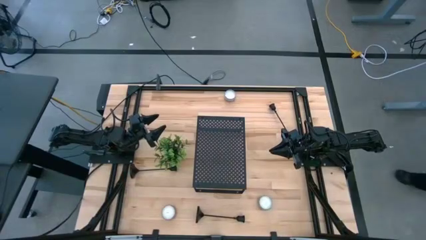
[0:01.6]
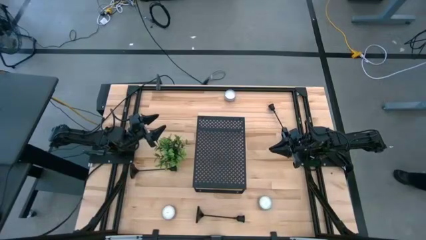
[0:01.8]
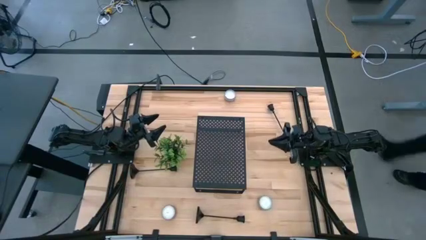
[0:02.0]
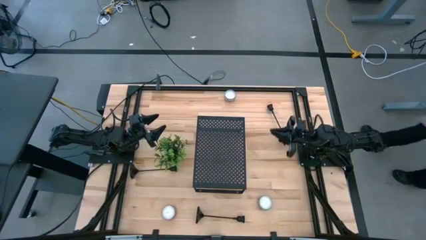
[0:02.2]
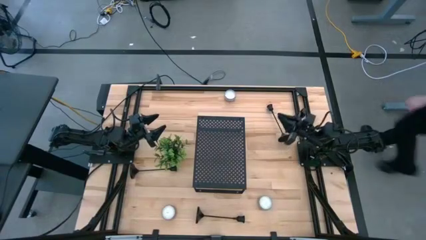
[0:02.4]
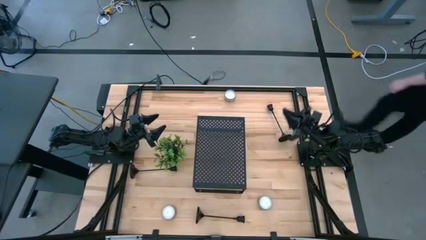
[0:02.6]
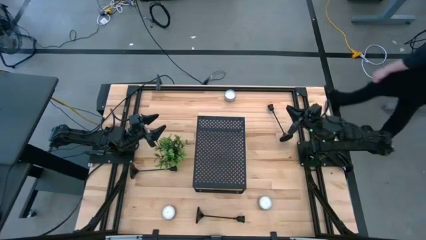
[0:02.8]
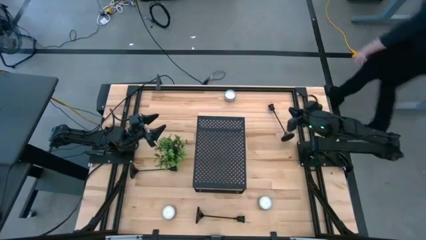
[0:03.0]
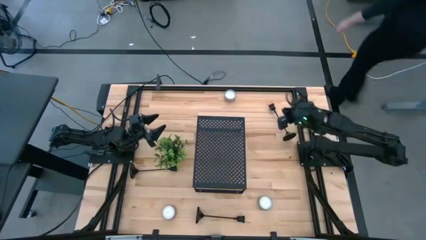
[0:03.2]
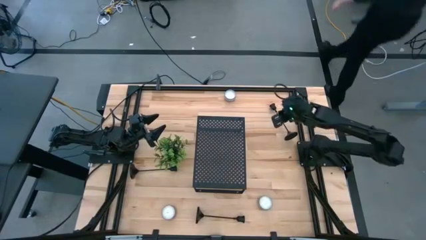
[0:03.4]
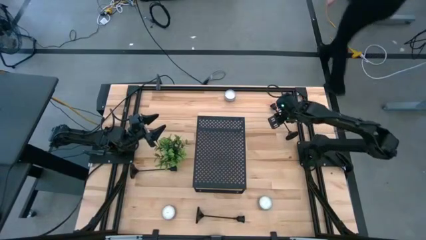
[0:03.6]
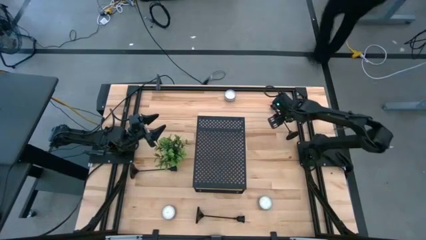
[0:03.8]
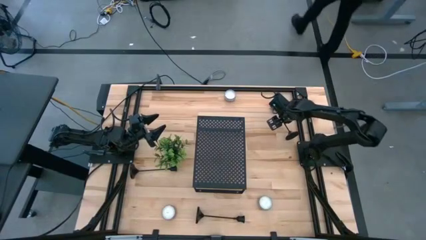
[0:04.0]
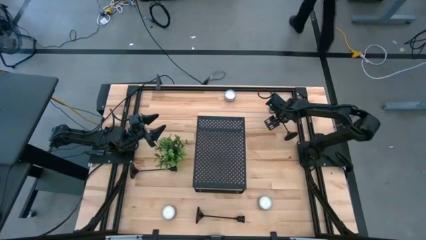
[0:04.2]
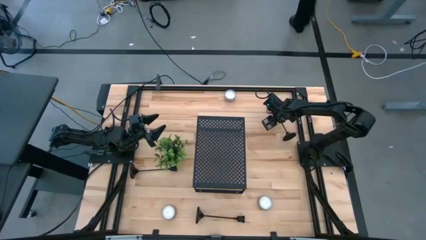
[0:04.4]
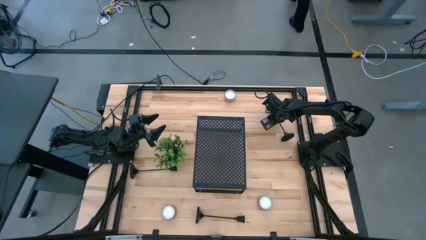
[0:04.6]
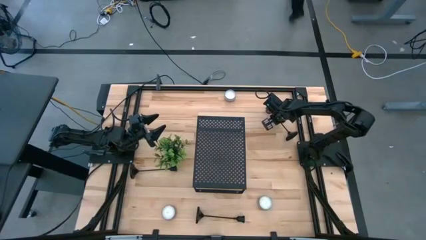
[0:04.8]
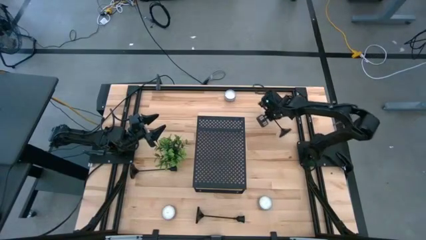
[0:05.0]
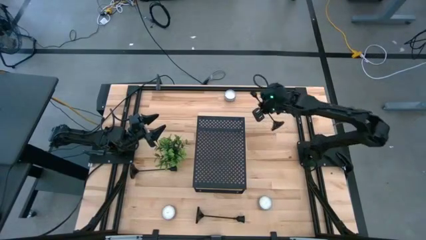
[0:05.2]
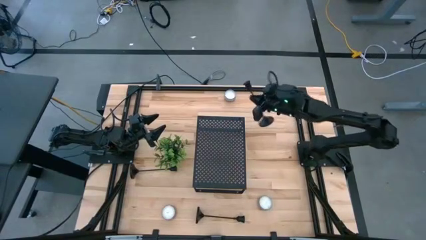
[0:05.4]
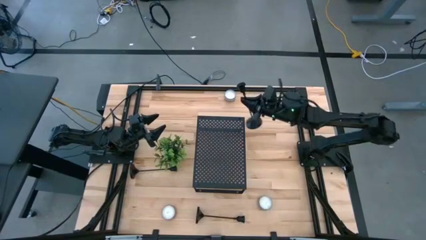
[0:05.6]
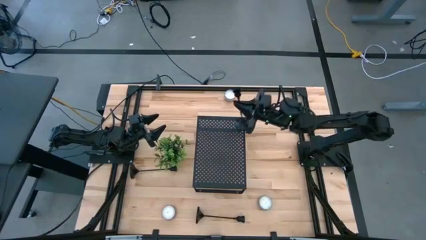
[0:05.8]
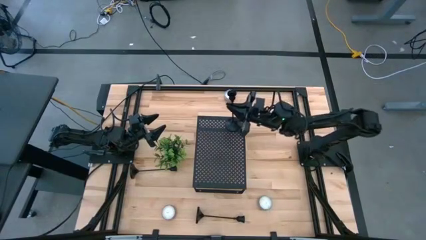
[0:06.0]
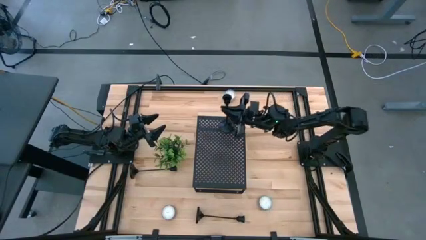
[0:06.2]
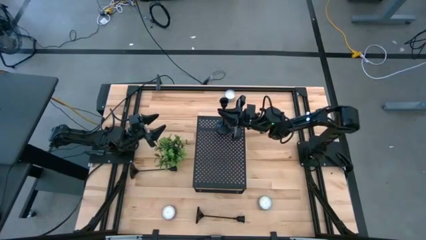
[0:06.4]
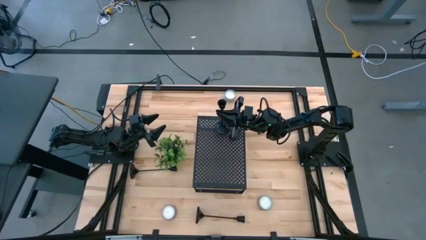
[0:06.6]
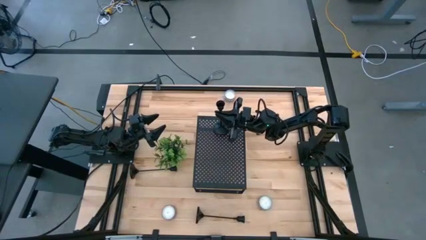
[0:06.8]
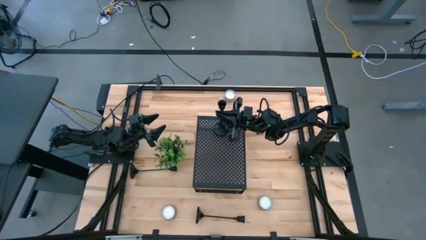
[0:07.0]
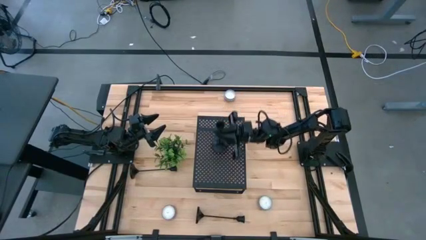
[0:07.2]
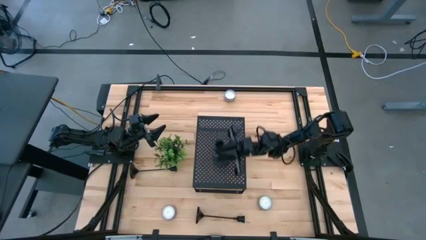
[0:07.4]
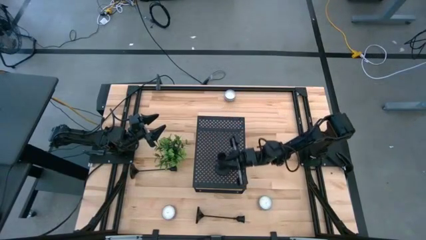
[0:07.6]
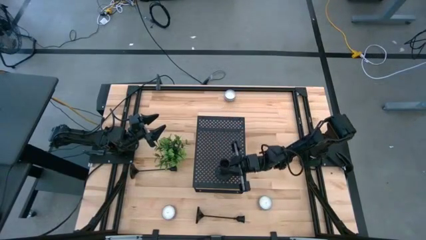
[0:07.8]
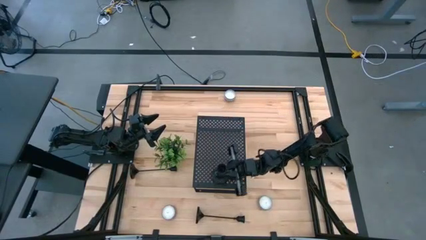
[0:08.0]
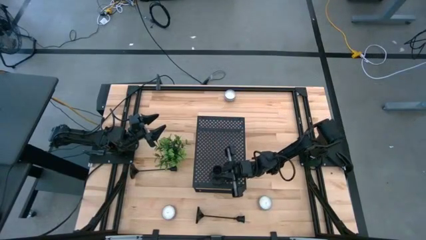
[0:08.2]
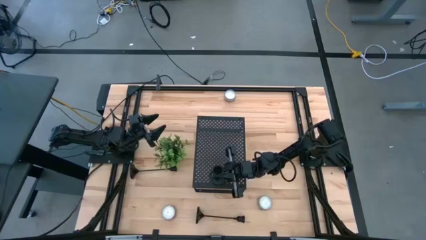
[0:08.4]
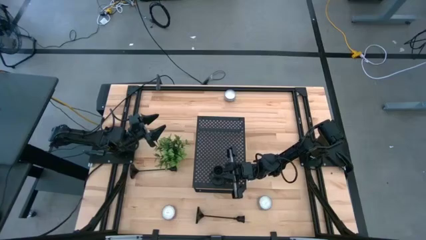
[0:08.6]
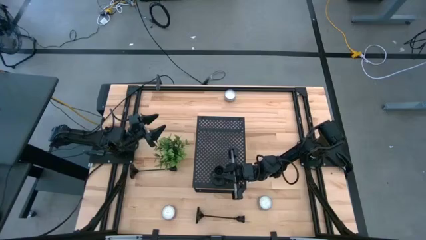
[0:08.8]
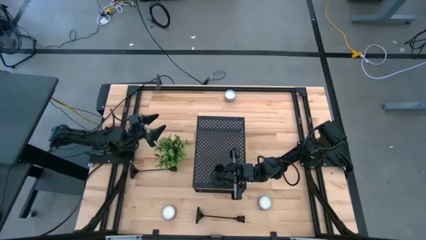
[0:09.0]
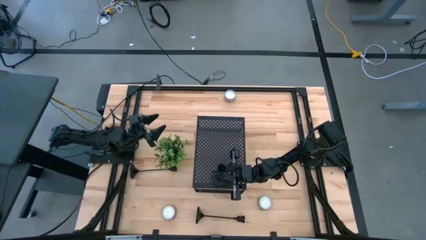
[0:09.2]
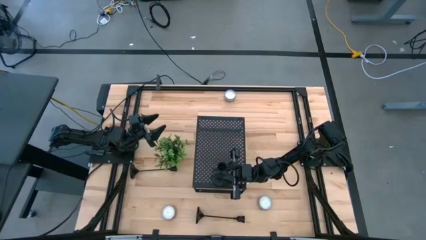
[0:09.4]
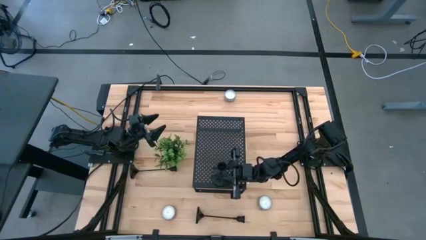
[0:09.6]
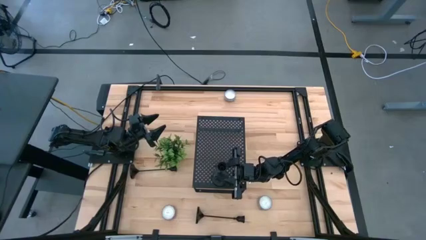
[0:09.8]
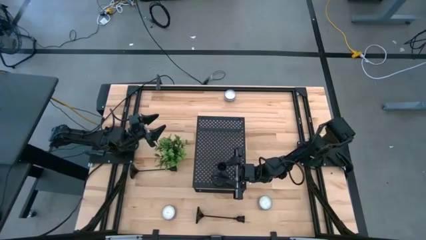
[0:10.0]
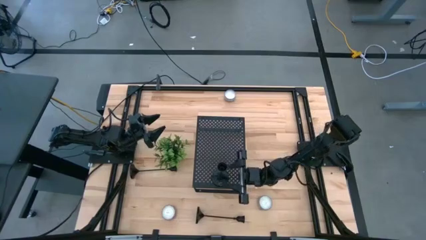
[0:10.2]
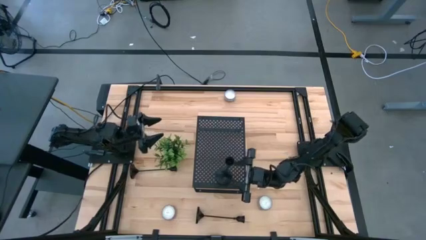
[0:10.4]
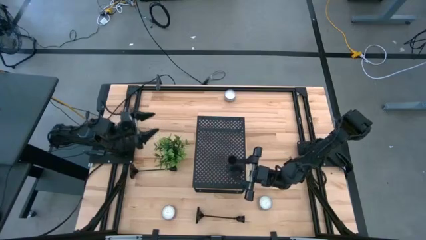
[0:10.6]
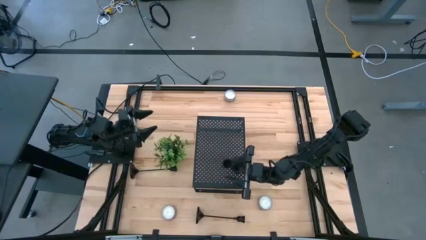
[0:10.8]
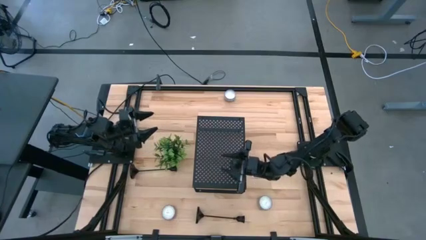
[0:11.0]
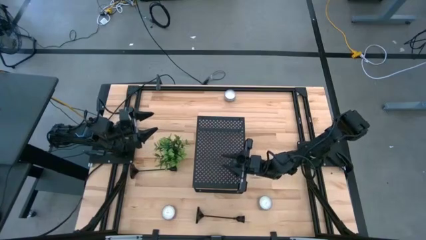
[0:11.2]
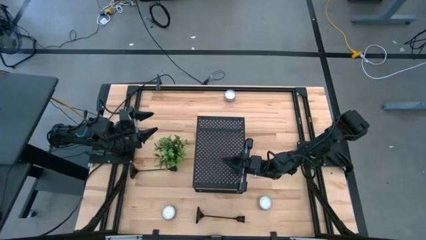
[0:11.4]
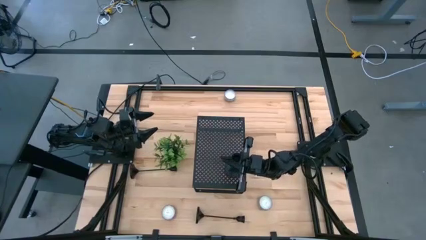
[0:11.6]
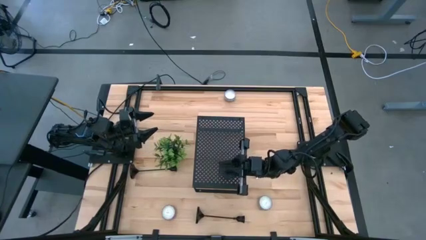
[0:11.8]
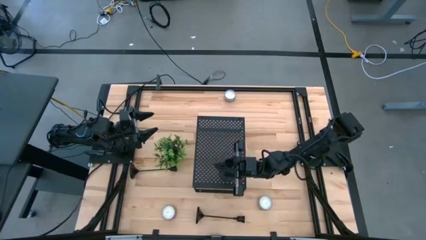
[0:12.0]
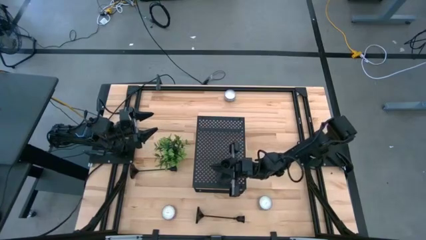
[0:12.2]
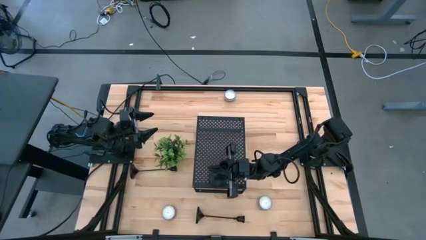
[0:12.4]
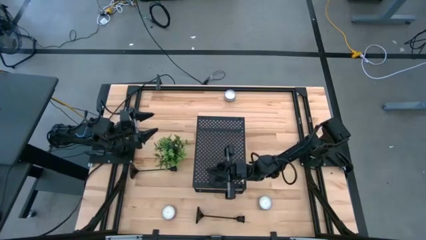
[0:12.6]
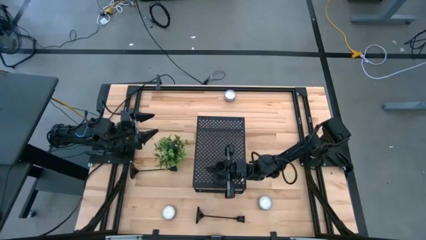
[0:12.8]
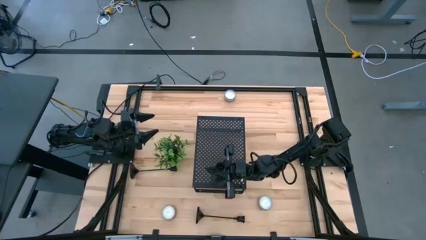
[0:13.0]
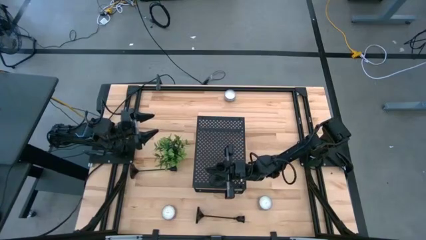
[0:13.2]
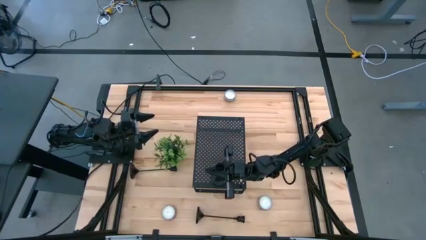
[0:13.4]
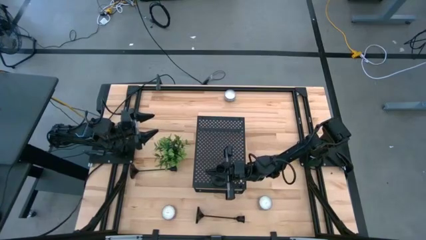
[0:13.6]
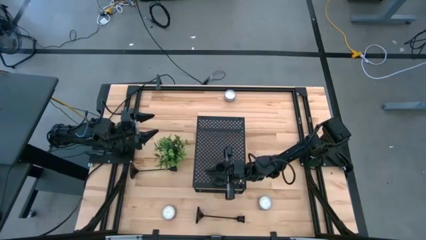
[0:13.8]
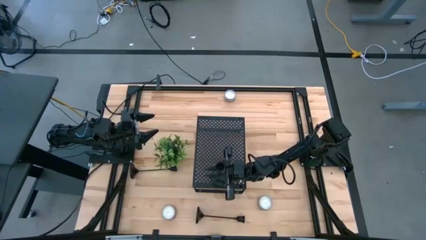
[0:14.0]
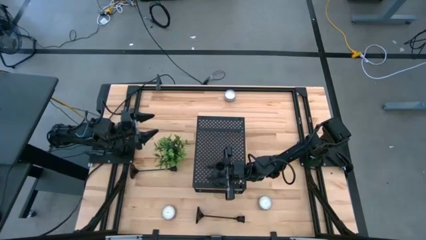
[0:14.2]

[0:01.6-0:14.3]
Task: Pick & Place candle stick holders
Put the top right black candlestick on the shelf
